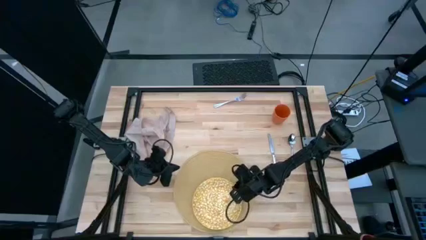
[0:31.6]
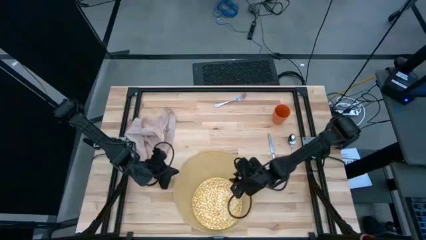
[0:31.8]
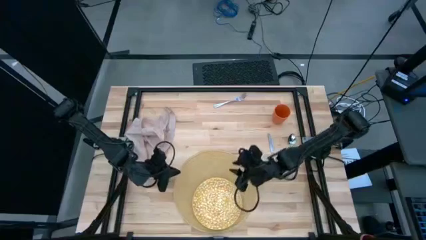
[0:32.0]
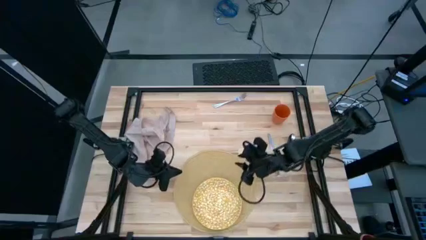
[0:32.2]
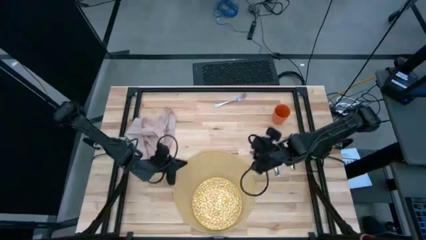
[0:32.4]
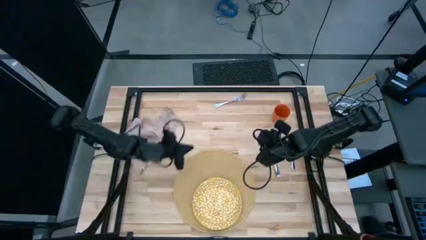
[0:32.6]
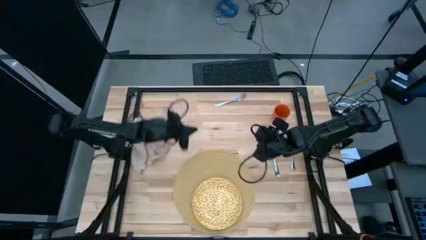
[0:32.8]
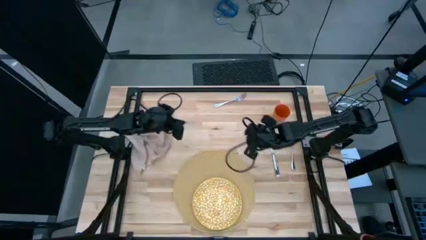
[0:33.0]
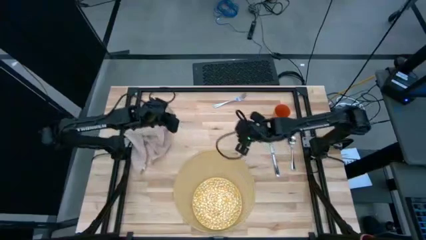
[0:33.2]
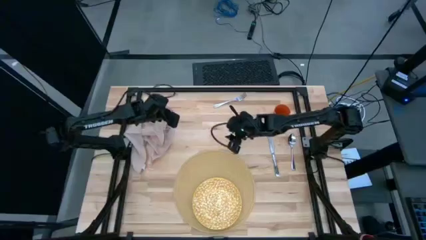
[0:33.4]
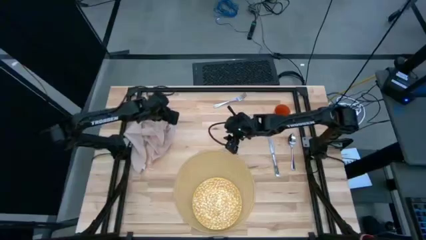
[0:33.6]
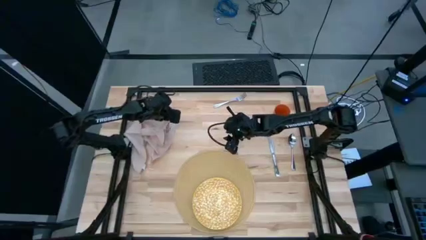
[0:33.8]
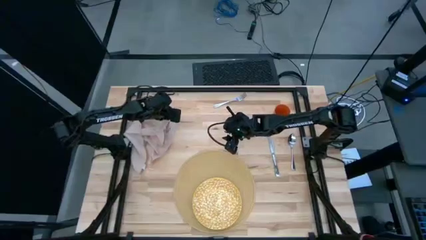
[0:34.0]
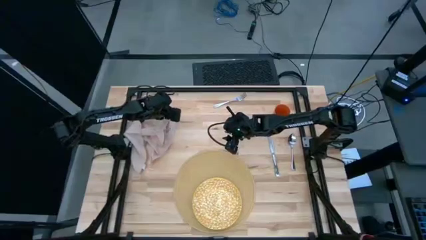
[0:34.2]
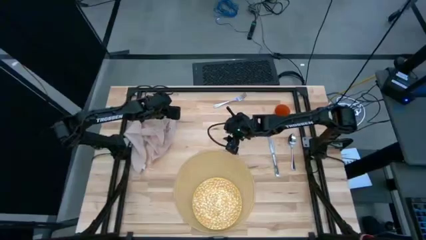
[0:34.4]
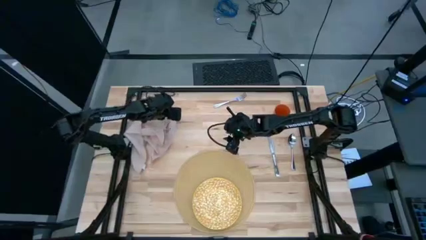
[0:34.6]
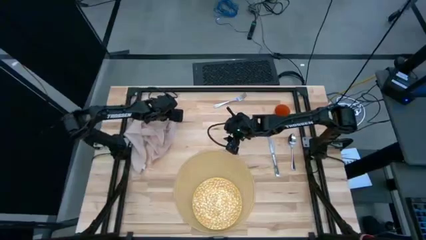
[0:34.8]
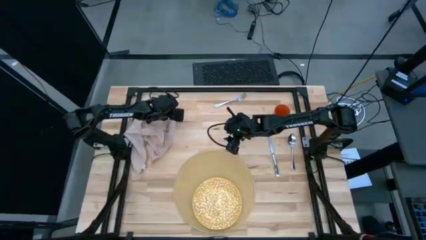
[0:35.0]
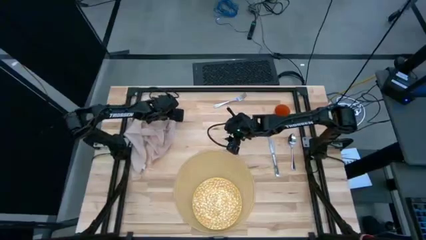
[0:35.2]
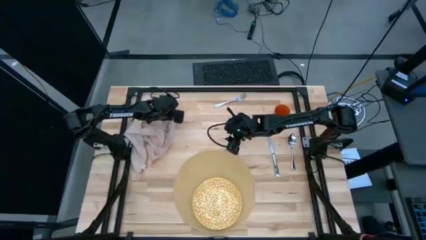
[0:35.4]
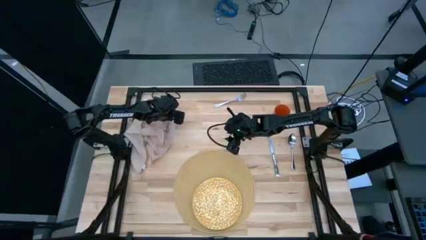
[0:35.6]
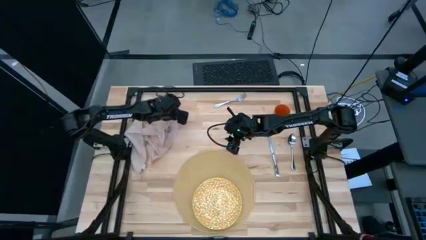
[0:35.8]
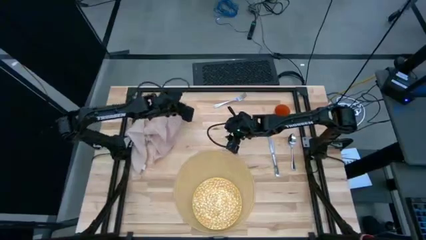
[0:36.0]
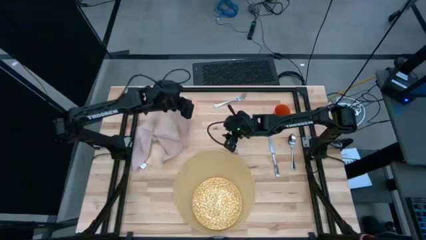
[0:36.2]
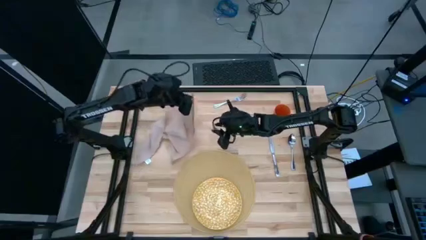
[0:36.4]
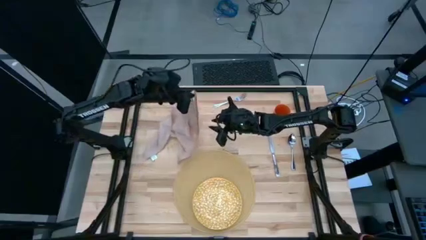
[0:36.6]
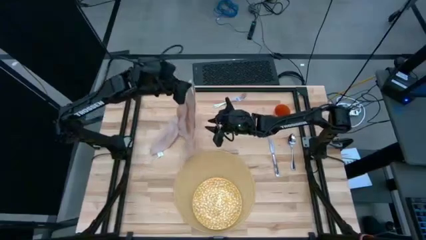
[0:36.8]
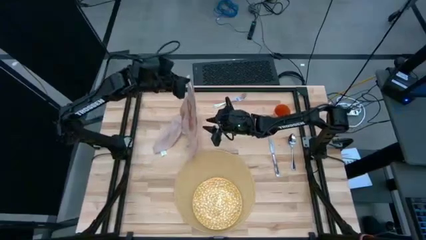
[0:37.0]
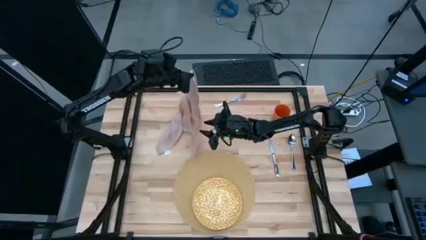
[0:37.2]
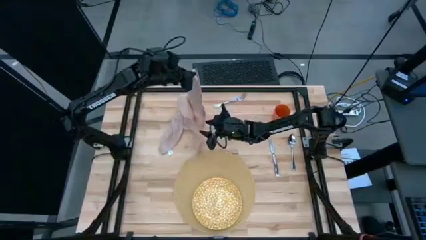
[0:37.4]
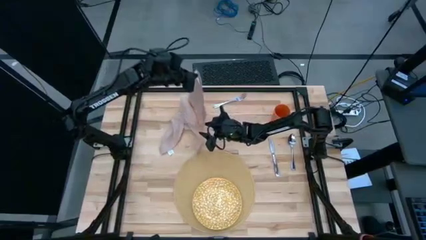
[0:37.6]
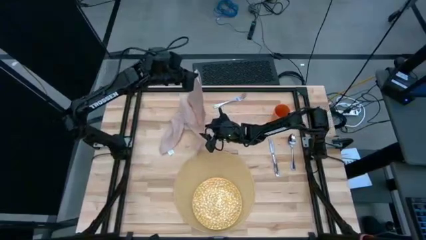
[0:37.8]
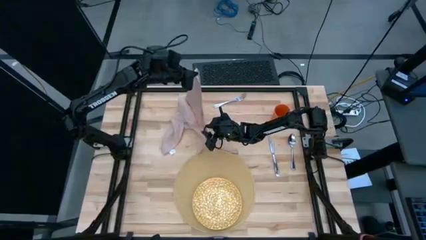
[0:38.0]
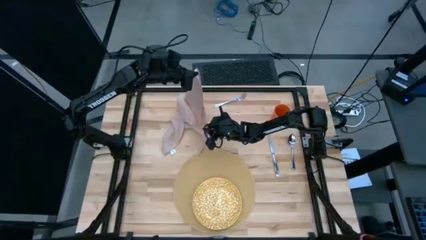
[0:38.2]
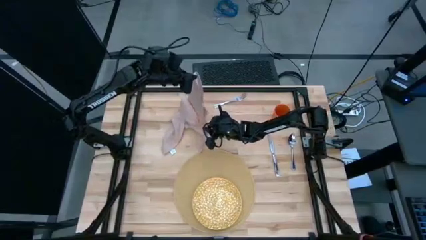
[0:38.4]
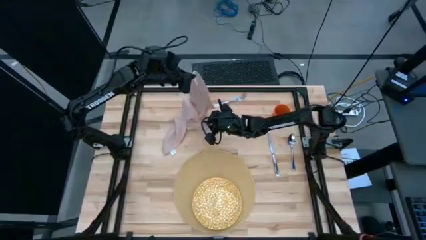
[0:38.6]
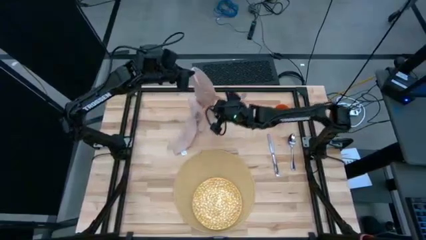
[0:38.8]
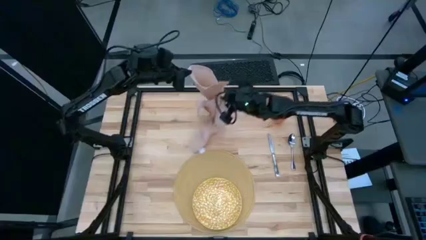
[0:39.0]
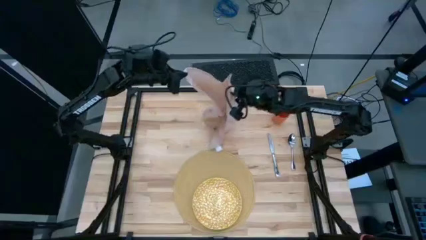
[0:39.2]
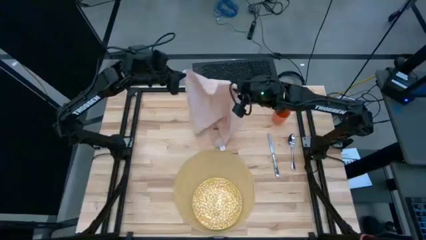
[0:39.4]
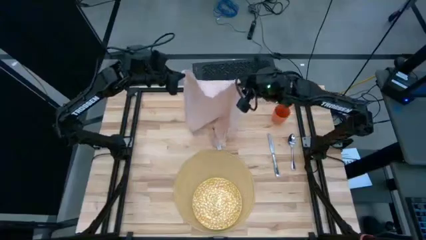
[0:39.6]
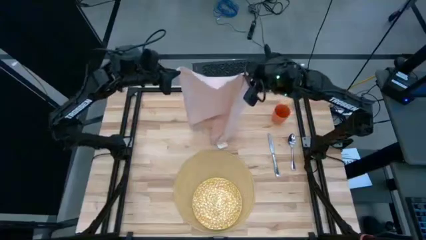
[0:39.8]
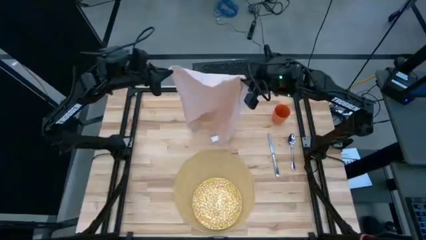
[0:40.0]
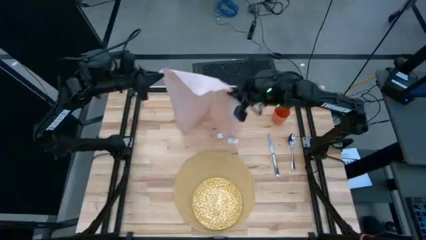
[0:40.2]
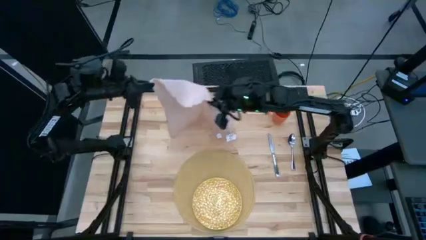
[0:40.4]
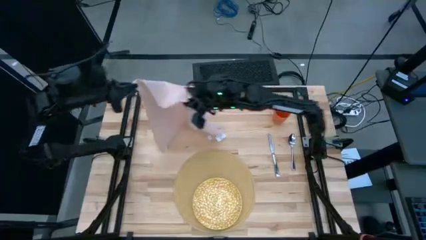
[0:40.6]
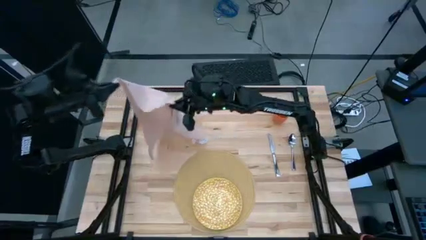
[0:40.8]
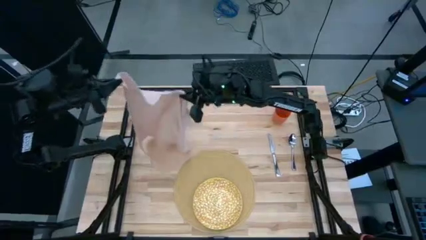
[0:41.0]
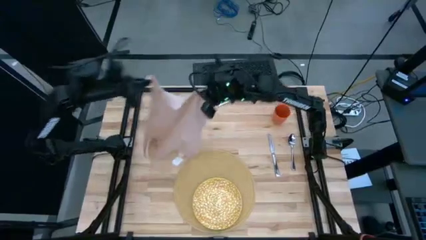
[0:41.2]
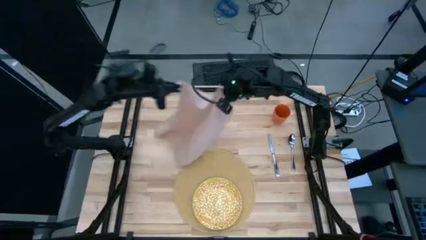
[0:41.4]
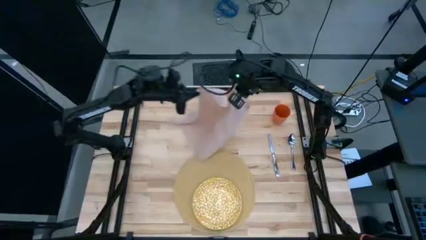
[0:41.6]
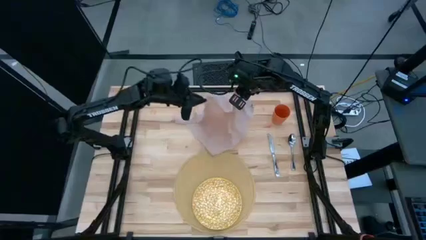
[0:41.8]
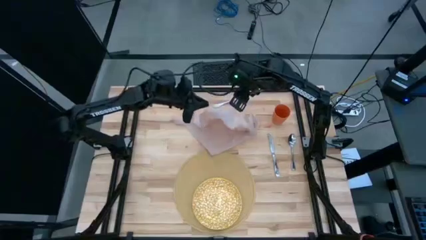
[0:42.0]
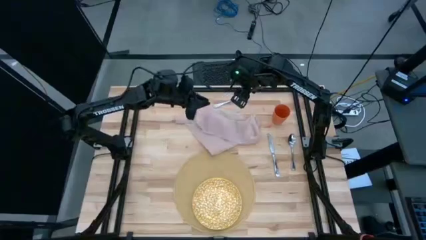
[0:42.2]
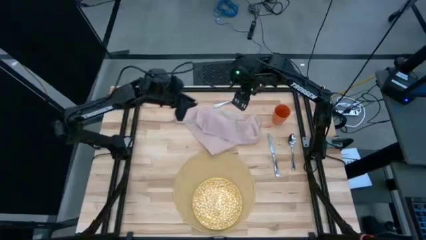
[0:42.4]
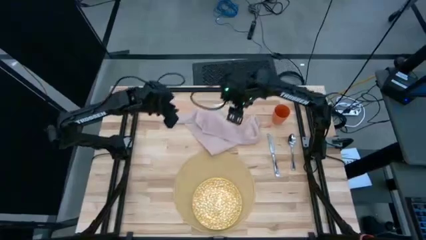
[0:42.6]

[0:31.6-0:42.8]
Task: Set table place
Fold the brown table napkin

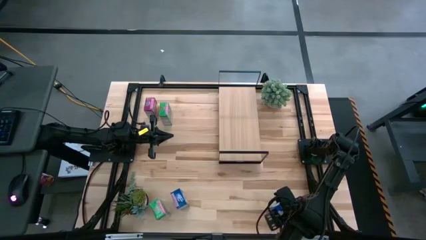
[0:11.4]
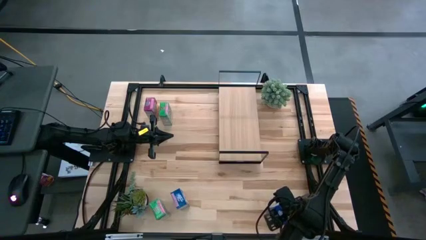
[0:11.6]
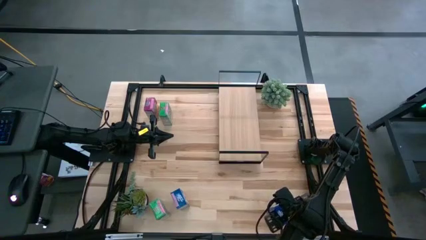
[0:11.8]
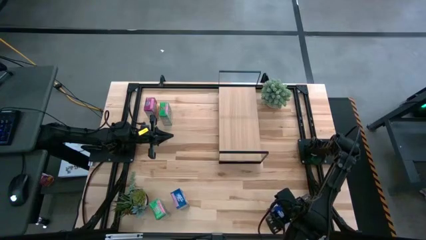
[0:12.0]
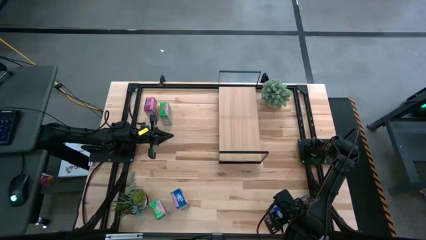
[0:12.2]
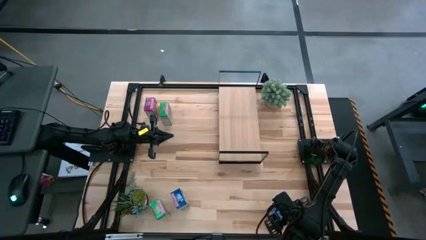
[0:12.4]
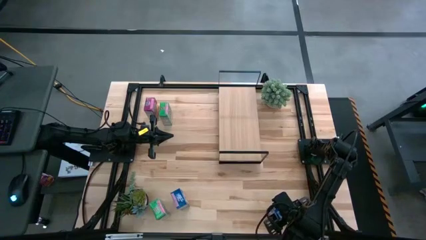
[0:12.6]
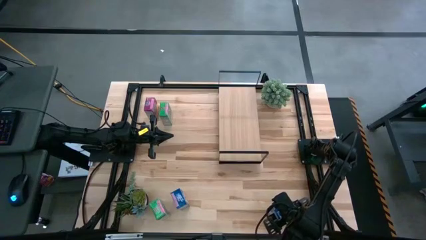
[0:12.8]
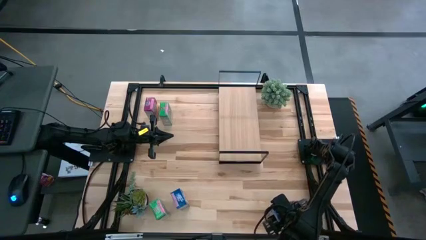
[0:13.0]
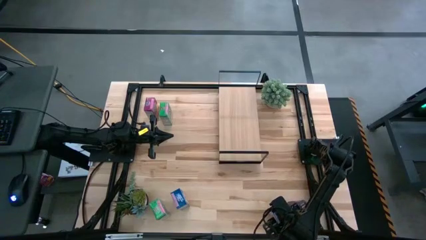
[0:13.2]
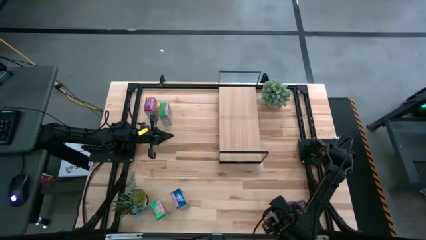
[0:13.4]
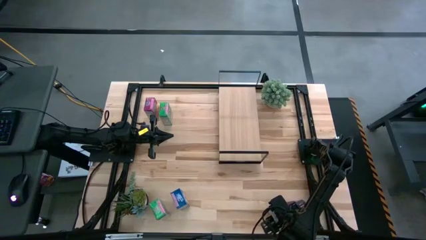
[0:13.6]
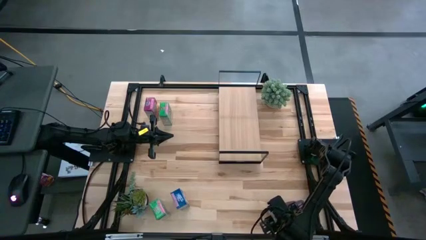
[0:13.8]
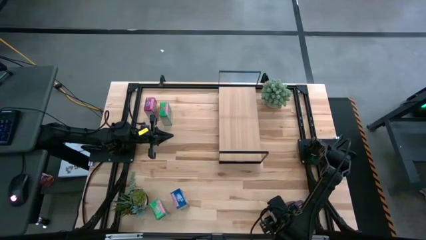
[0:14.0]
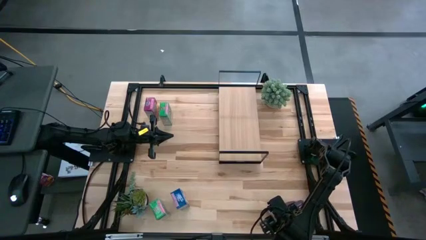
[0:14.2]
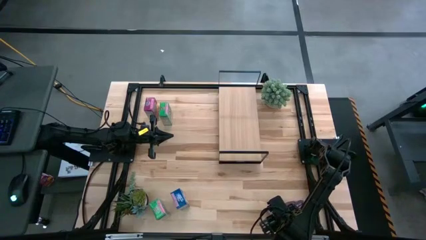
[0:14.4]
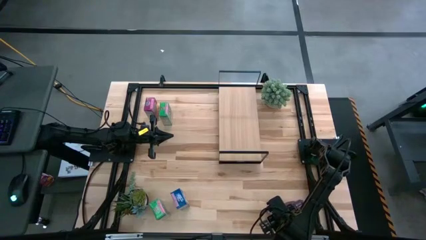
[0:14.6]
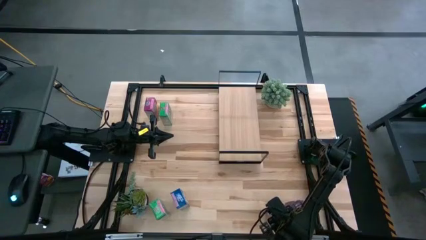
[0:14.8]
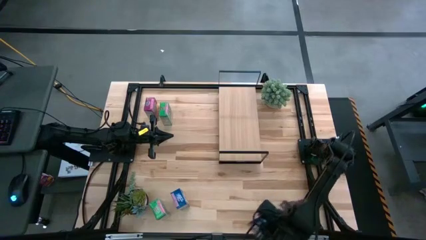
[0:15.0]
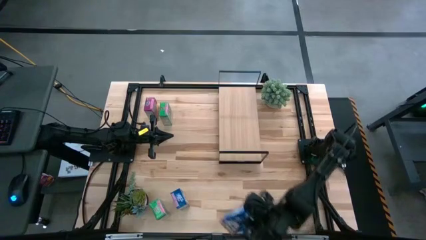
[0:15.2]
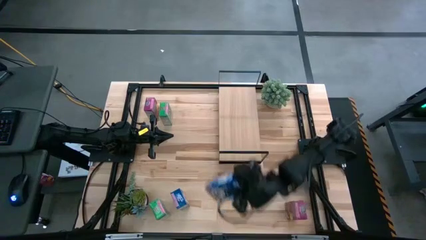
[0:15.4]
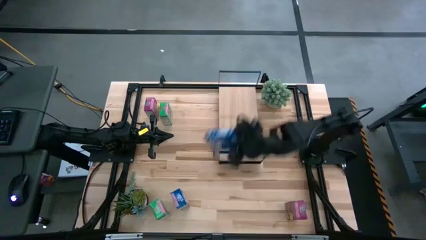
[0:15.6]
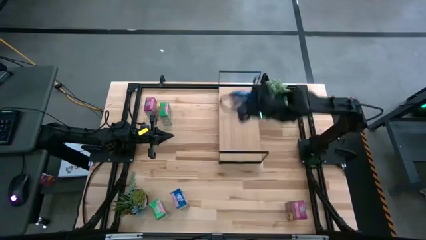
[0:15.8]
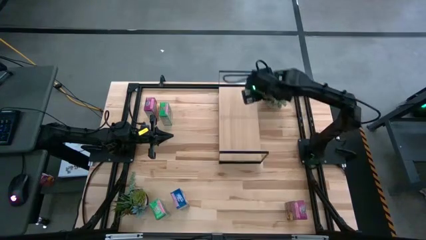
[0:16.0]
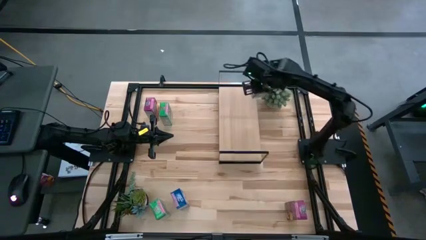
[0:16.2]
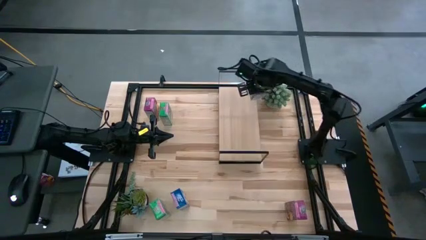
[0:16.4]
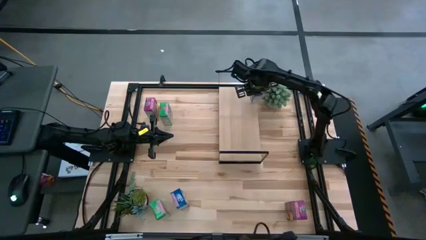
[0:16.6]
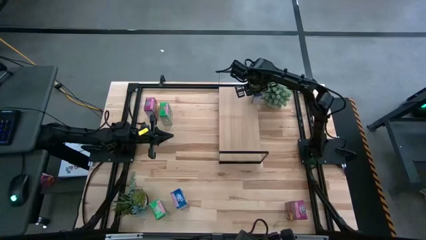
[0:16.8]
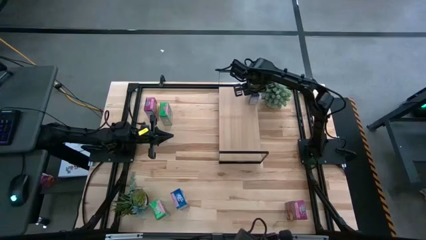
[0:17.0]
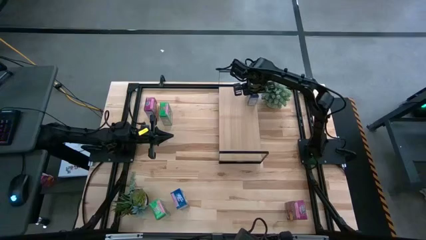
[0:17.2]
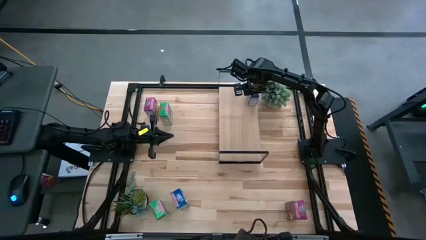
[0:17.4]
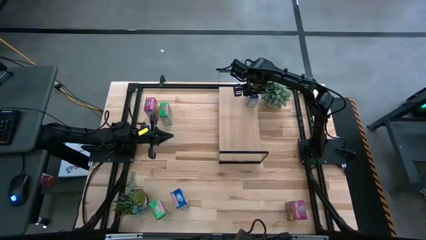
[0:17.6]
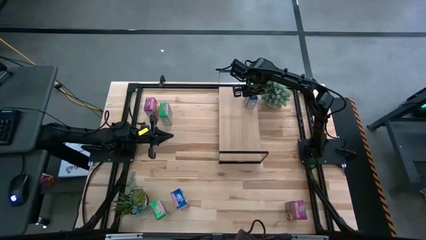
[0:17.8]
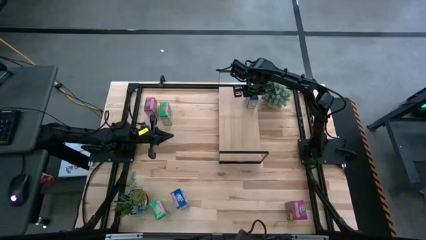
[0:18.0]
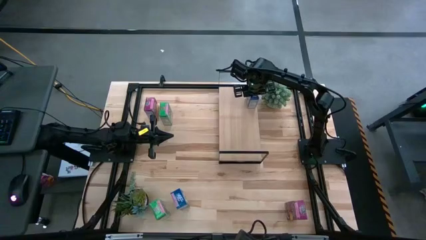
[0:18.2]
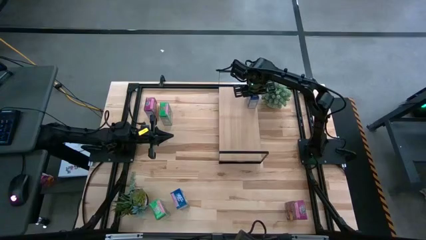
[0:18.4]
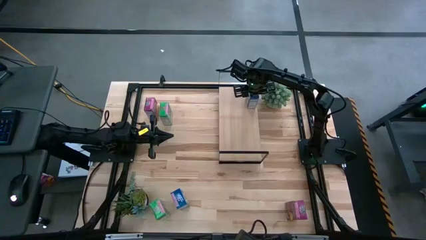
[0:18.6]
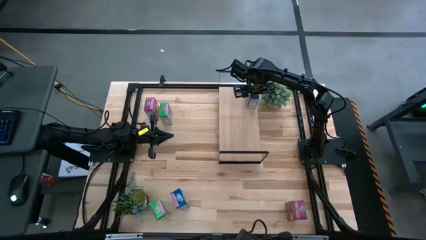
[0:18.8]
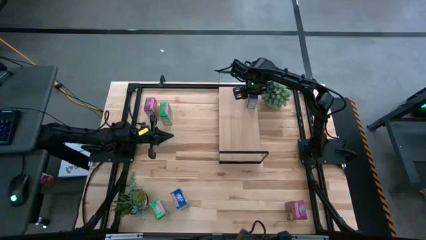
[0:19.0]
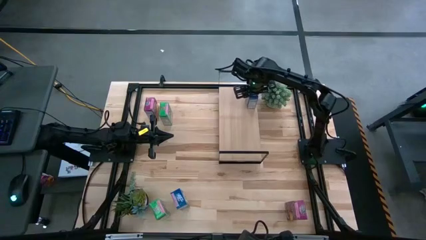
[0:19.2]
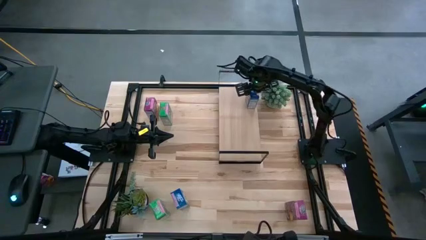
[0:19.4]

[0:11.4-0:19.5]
Task: Stack cereal on shelf
Put the right blue cereal box on the shelf
